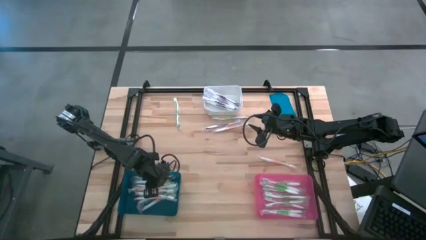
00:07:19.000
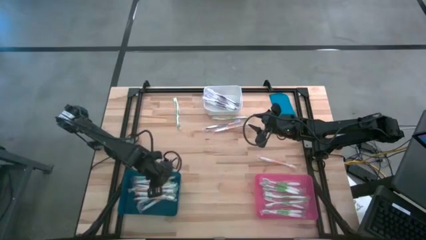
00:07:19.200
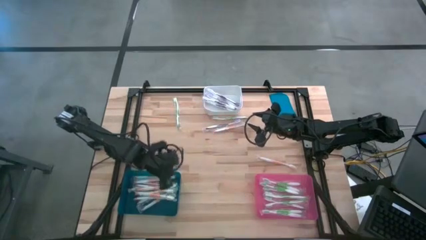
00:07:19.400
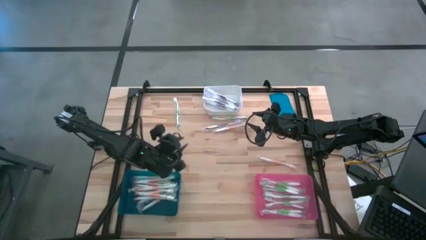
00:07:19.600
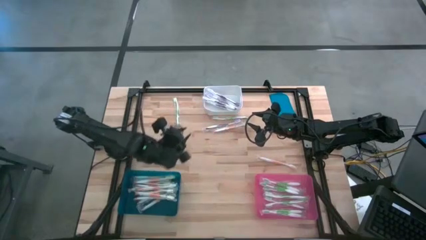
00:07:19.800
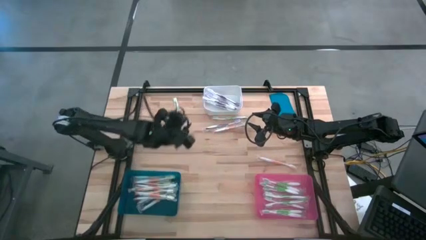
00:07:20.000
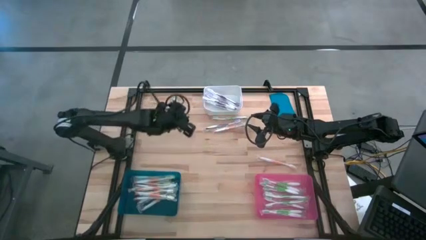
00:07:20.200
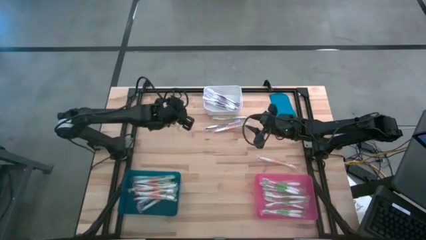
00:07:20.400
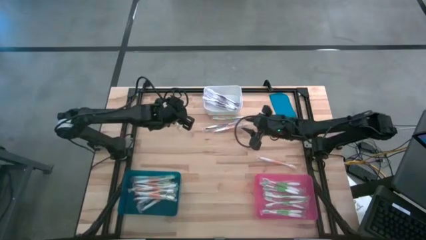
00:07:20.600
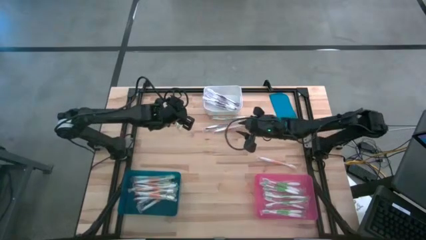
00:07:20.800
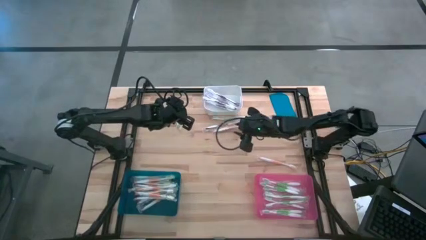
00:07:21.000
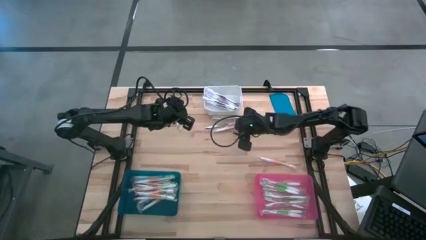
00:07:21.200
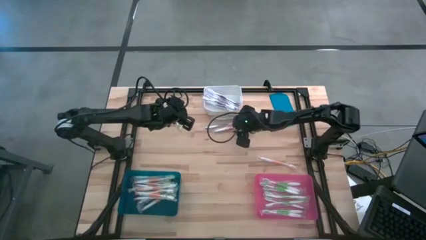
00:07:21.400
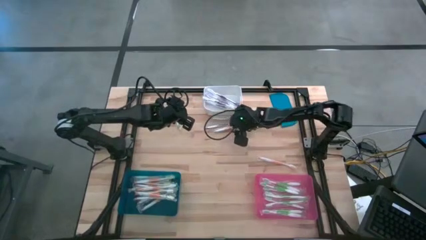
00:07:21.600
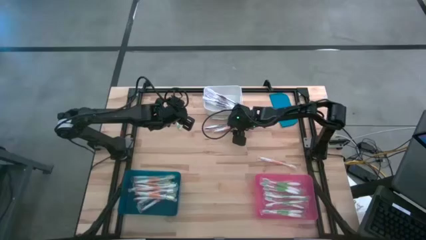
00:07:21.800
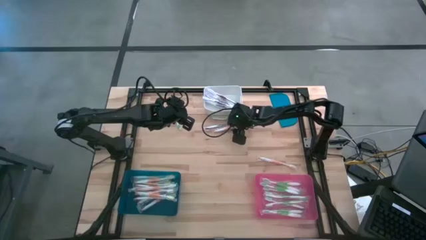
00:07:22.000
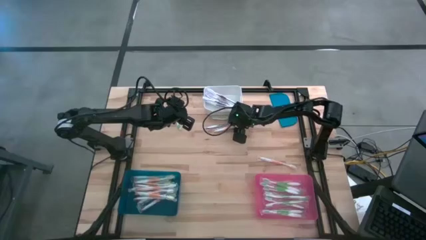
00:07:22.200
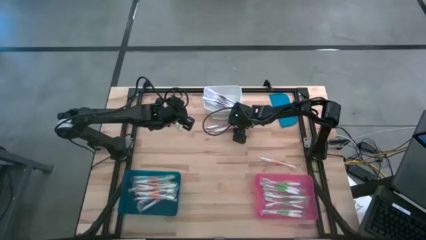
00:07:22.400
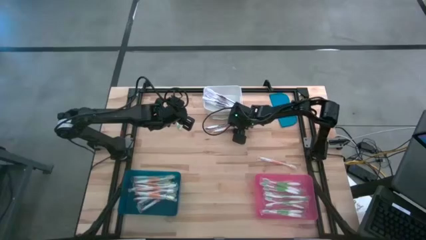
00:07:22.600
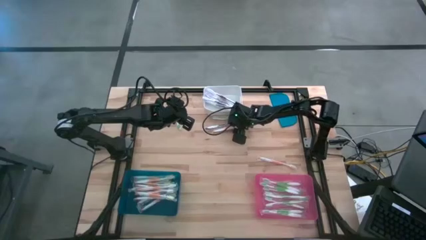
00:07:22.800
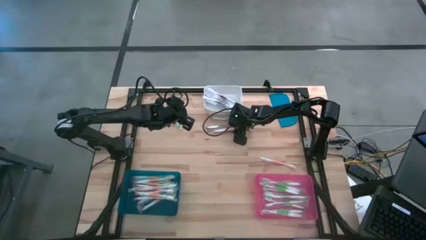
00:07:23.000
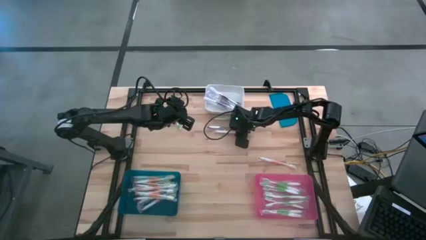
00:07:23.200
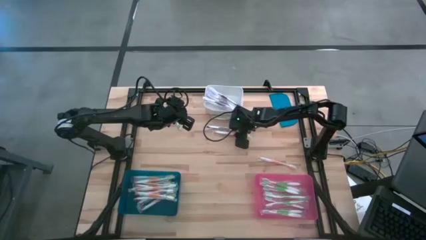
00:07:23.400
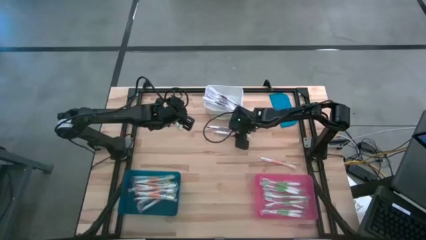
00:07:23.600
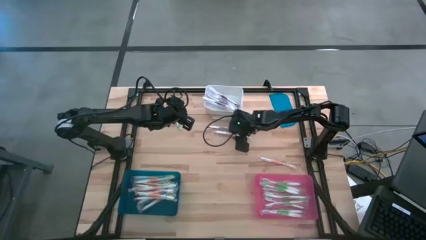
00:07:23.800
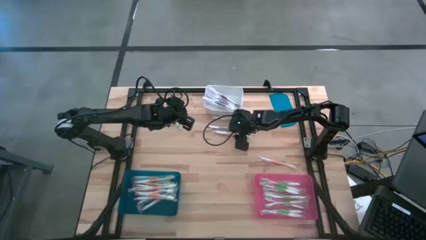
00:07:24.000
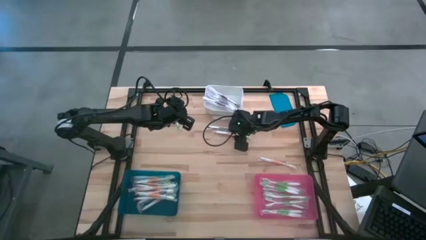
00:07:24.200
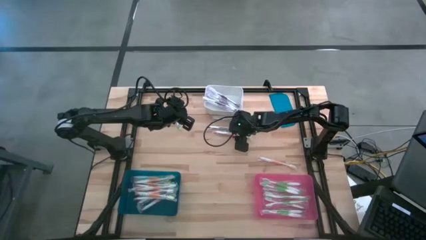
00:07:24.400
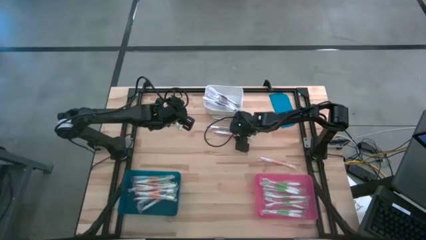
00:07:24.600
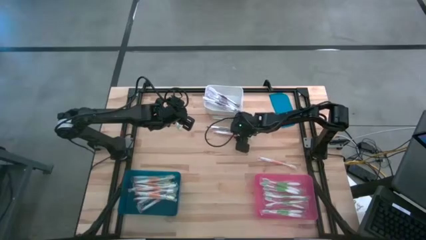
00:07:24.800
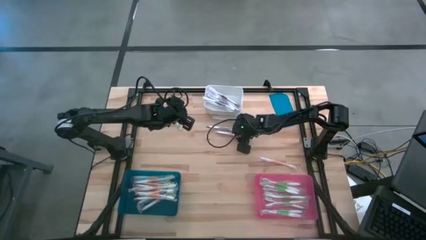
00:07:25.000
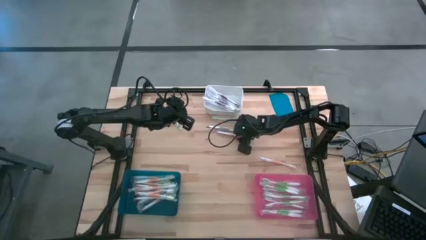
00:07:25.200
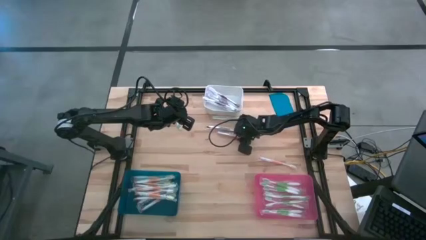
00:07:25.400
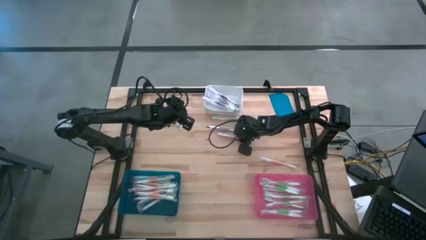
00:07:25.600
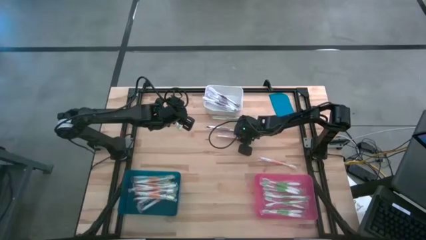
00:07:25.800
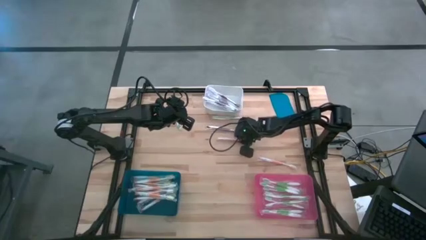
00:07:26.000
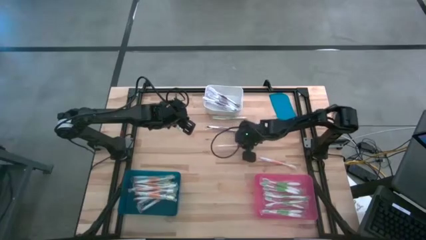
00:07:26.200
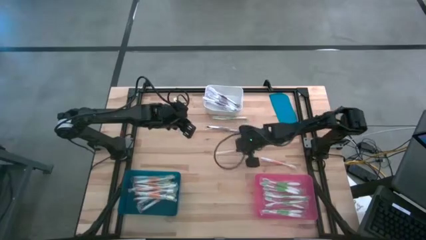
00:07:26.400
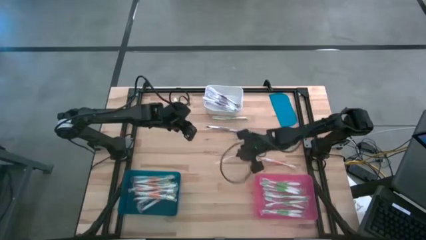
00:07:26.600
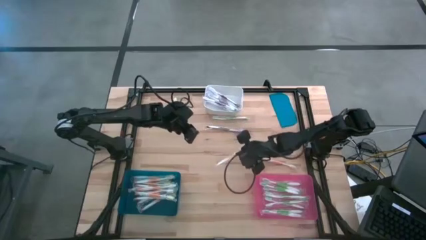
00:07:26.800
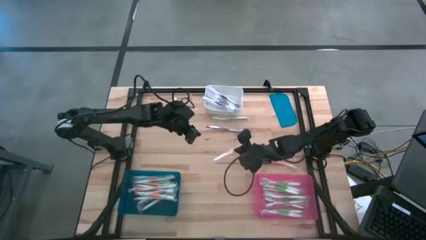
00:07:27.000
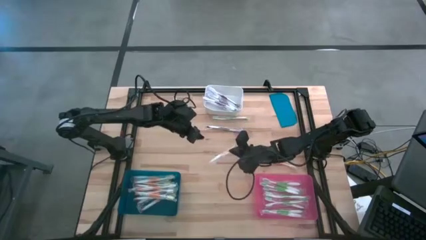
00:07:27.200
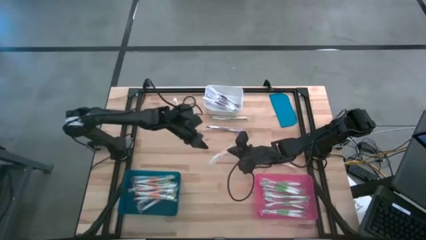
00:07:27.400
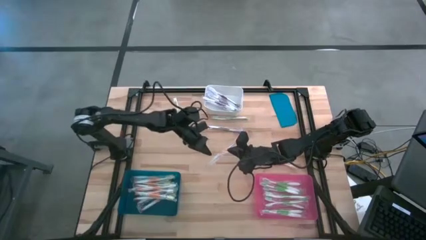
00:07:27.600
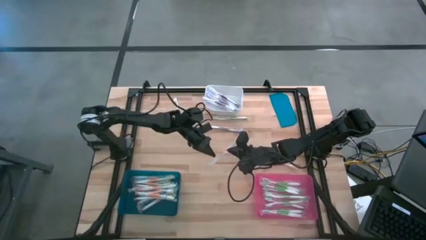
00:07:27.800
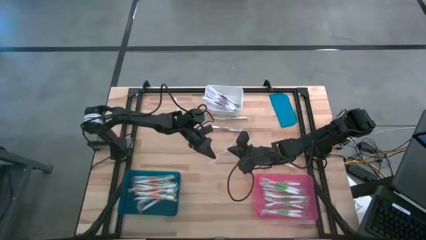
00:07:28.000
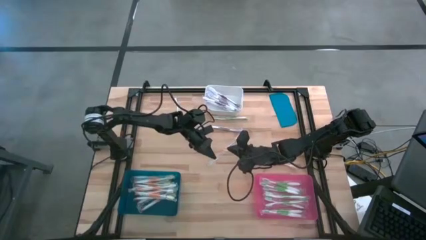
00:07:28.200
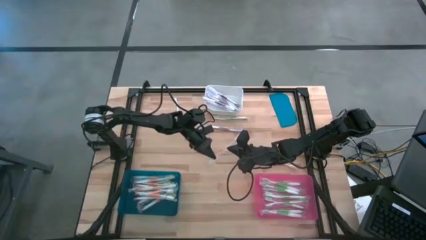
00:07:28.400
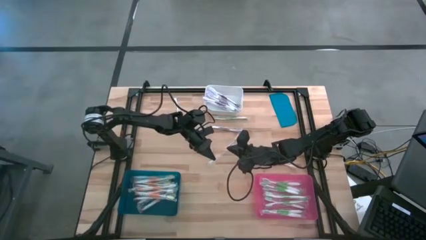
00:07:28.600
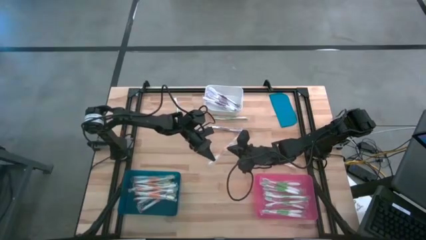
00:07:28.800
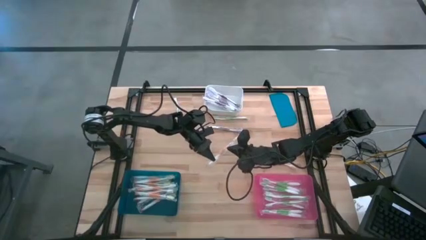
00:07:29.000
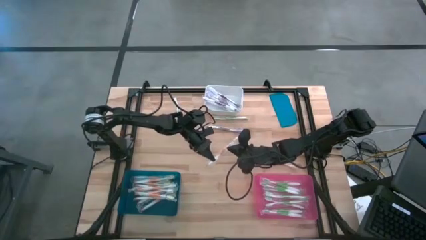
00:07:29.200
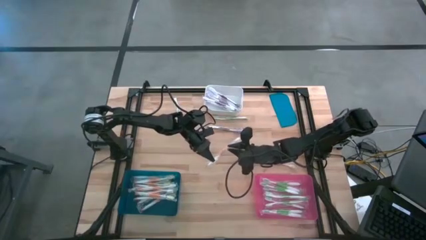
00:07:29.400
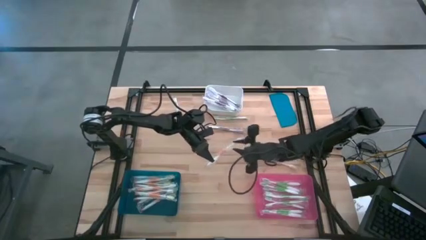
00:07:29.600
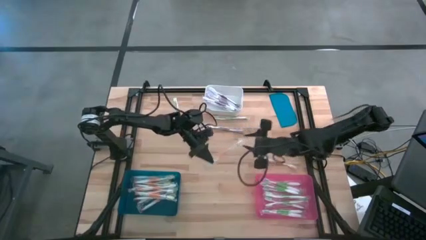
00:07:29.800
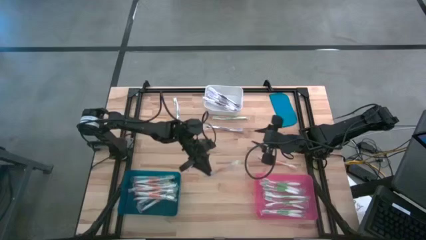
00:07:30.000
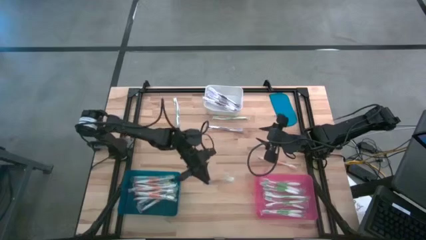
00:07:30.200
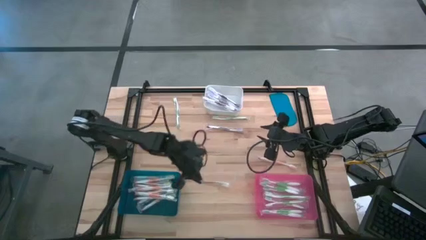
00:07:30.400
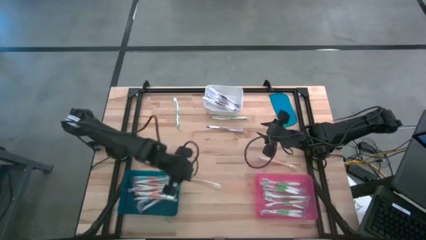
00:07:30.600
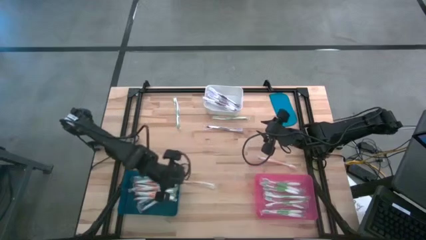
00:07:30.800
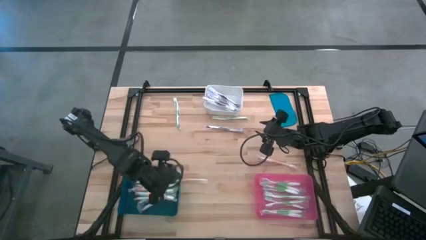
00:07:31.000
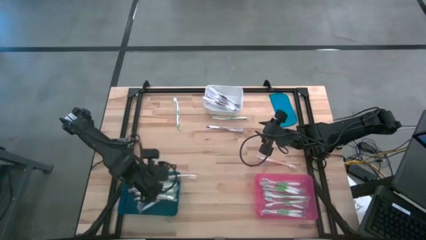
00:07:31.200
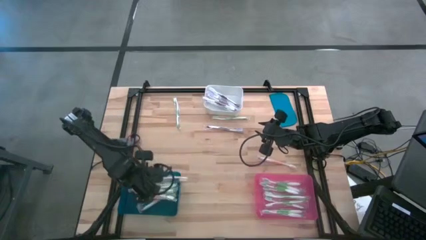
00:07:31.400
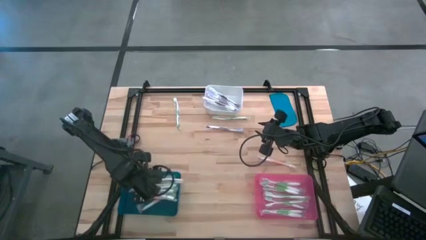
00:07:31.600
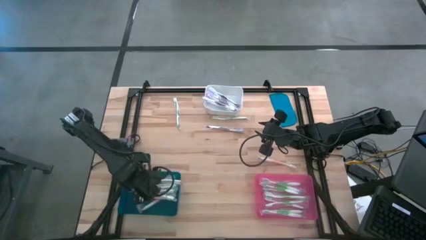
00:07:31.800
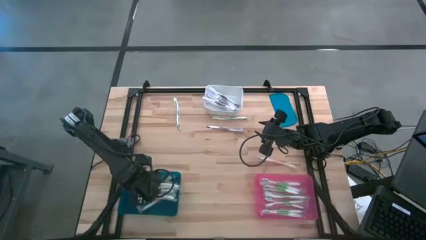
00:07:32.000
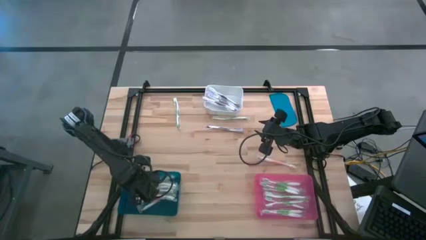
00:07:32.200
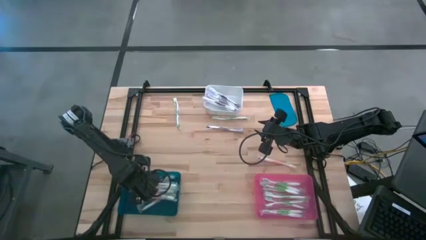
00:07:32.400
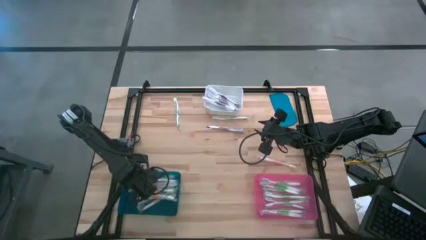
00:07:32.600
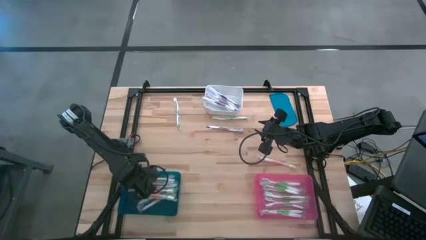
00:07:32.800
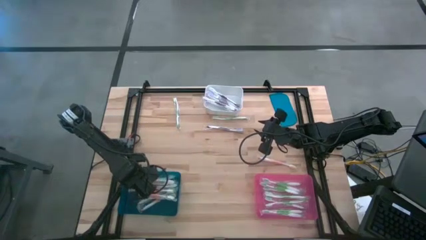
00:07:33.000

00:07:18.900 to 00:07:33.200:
Task: Pick & Place Toothbrushes
Put the orange toothbrush into the blue bin
